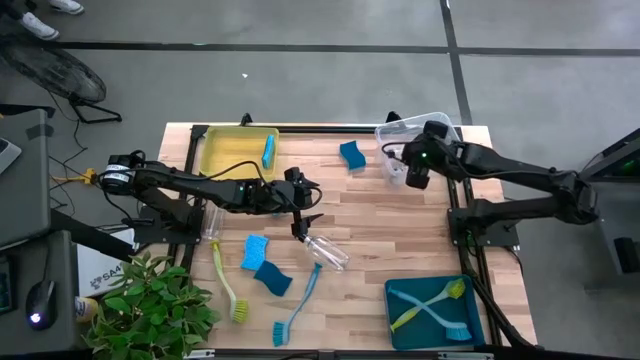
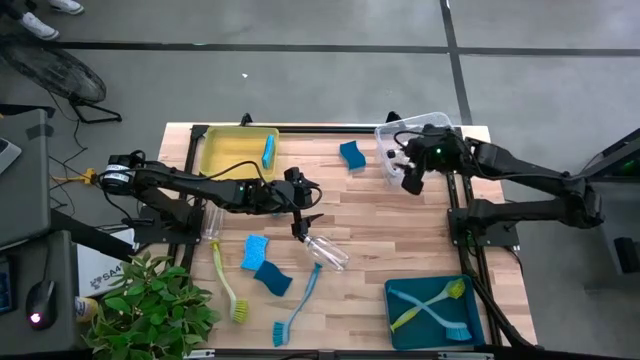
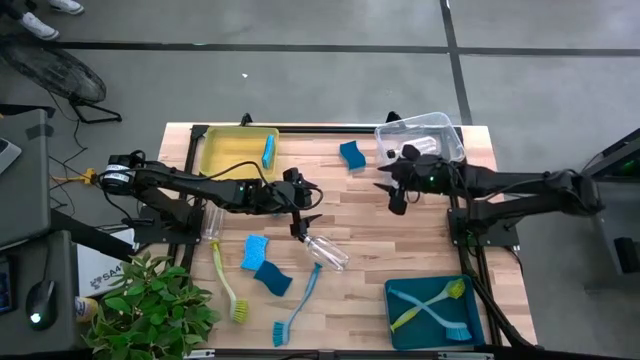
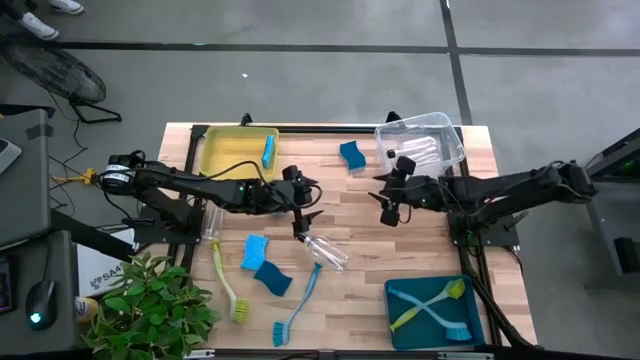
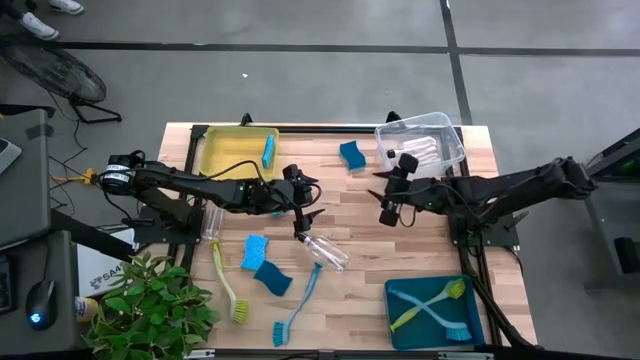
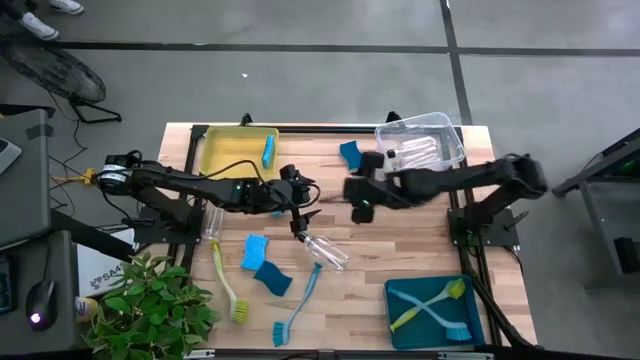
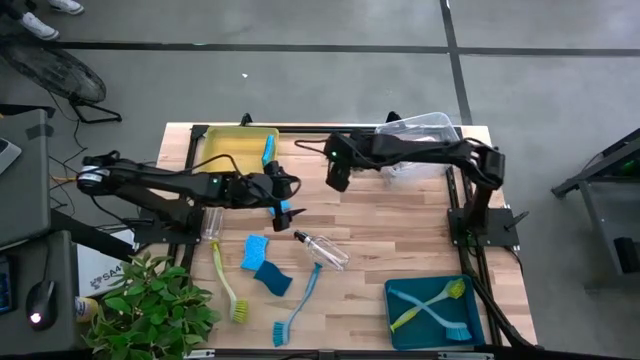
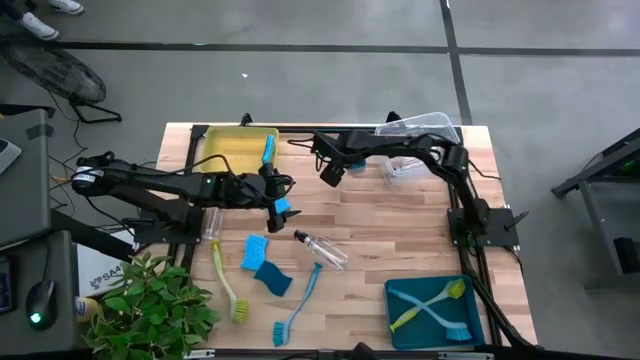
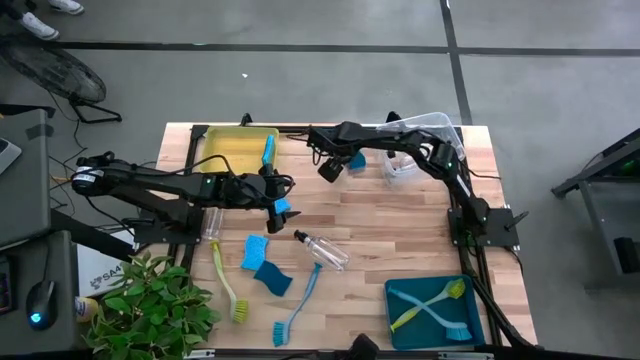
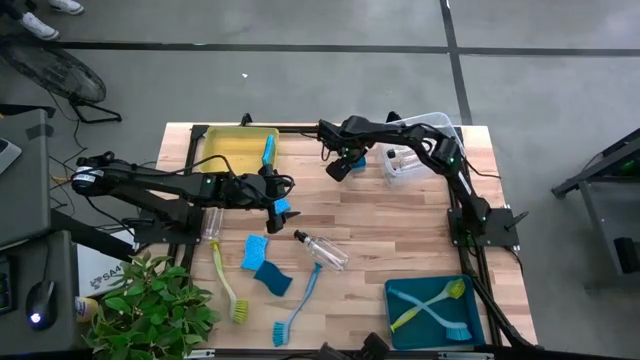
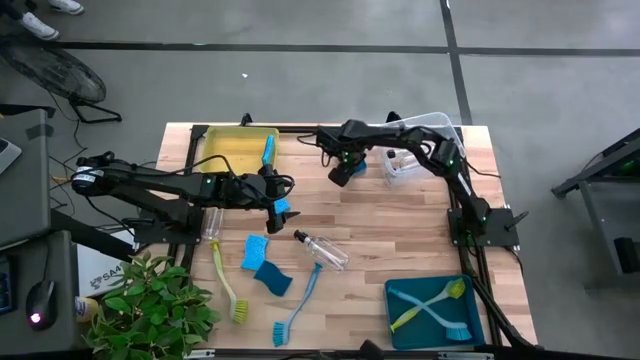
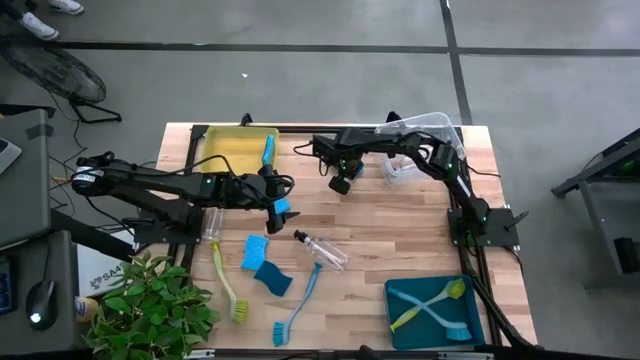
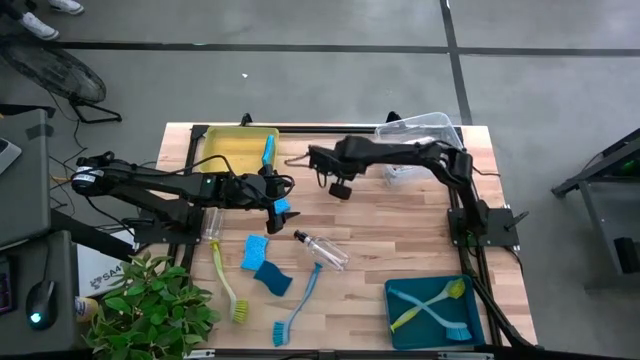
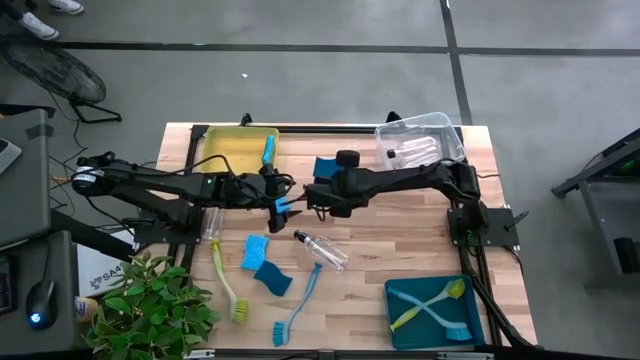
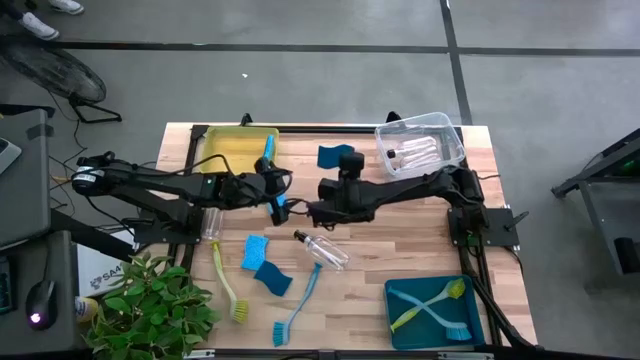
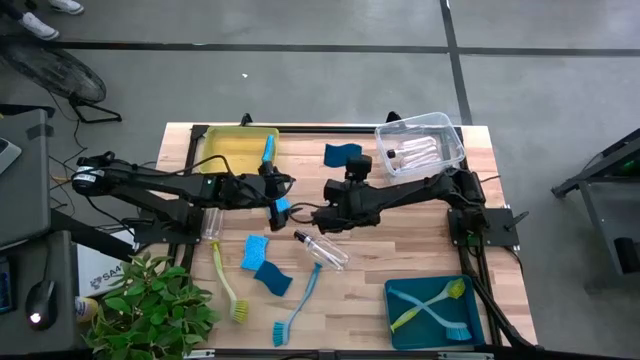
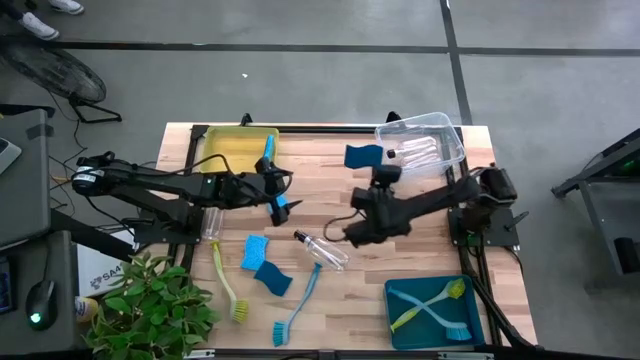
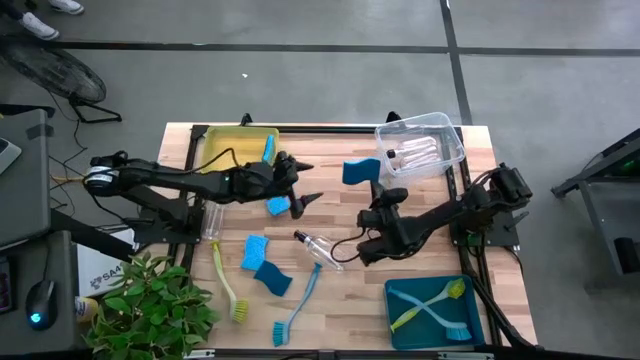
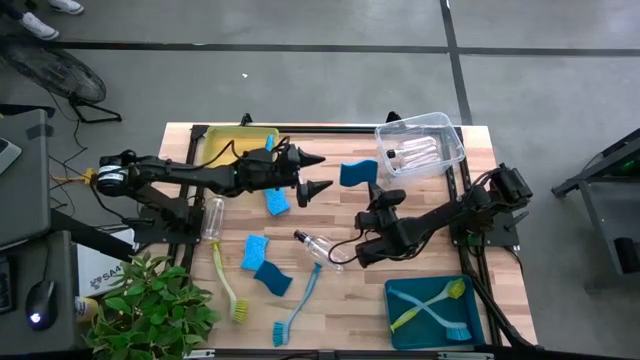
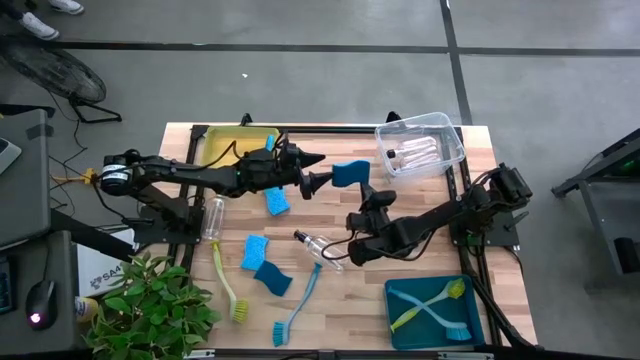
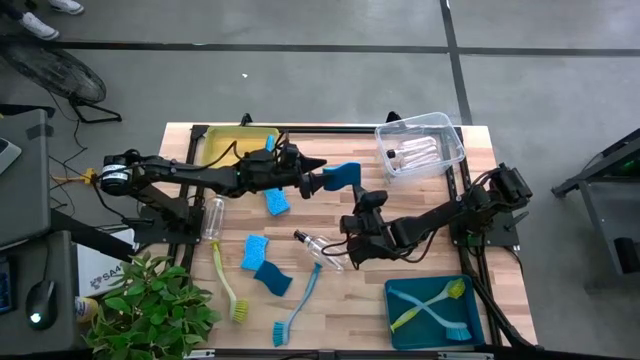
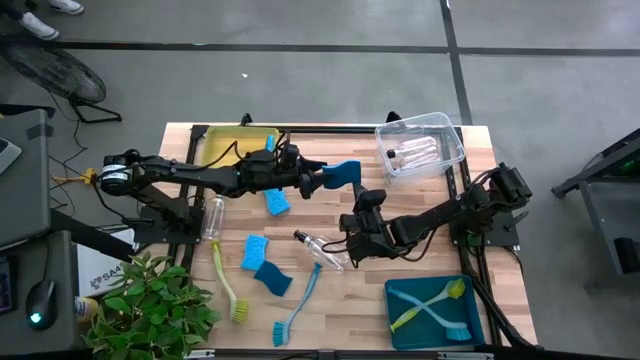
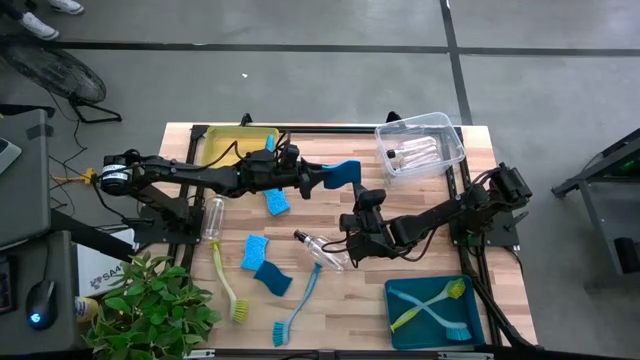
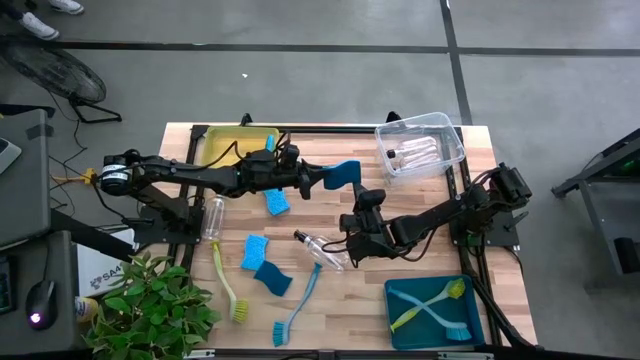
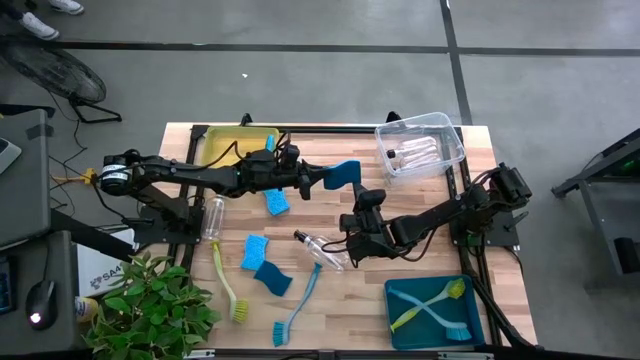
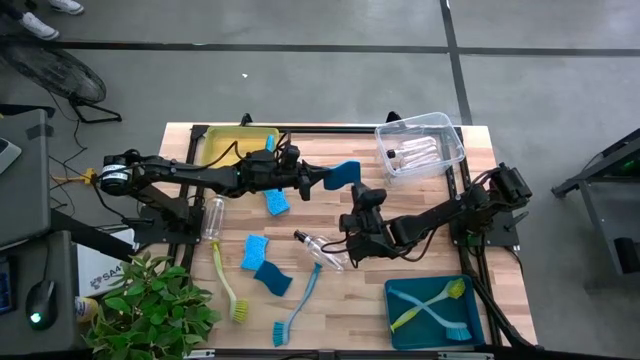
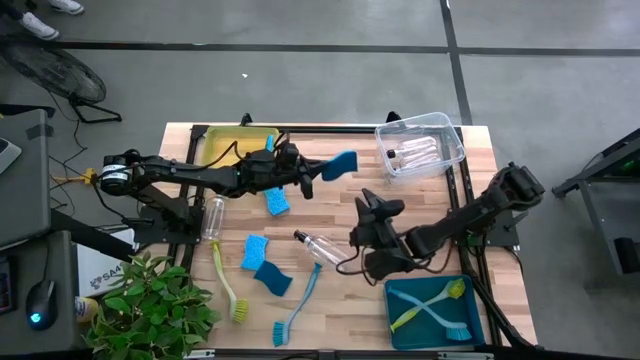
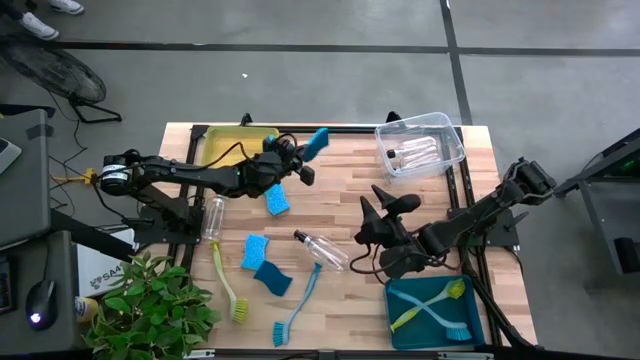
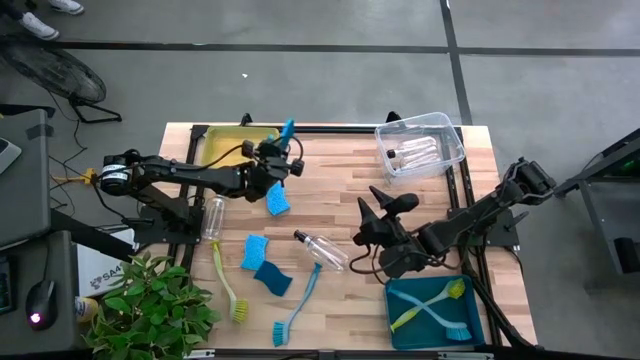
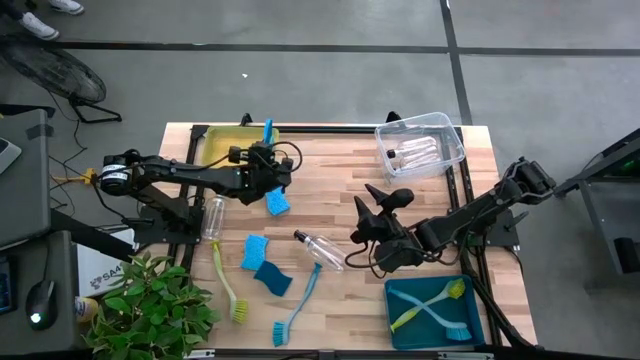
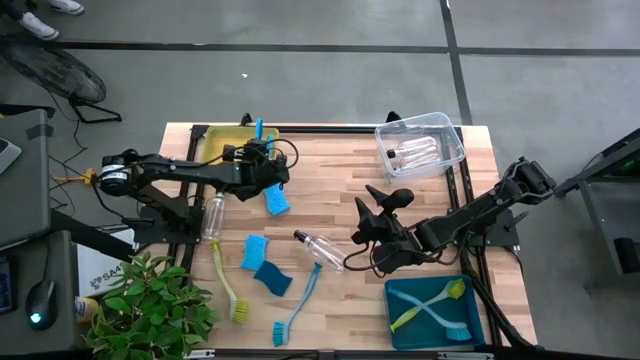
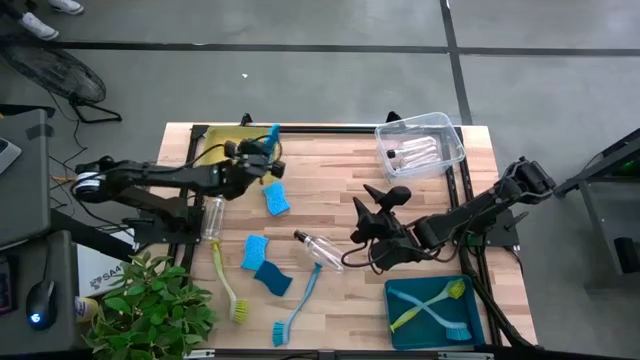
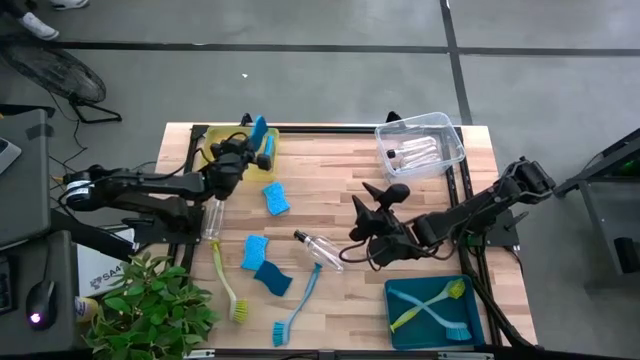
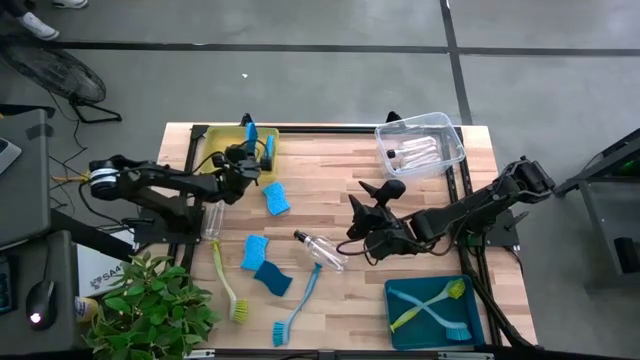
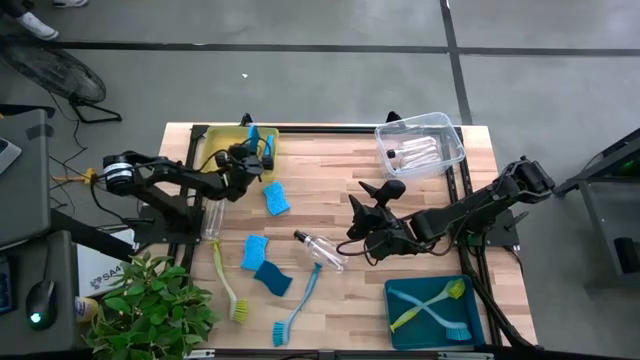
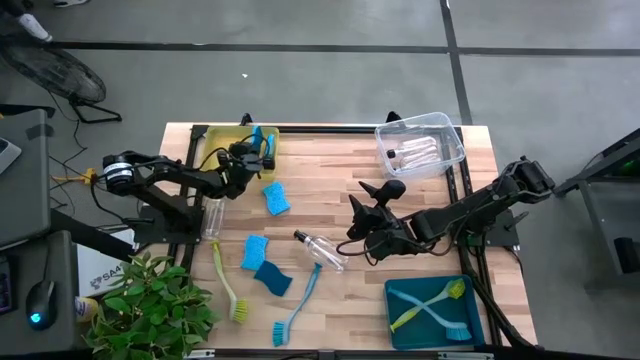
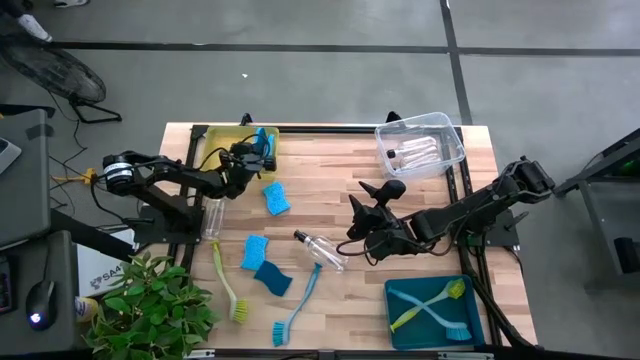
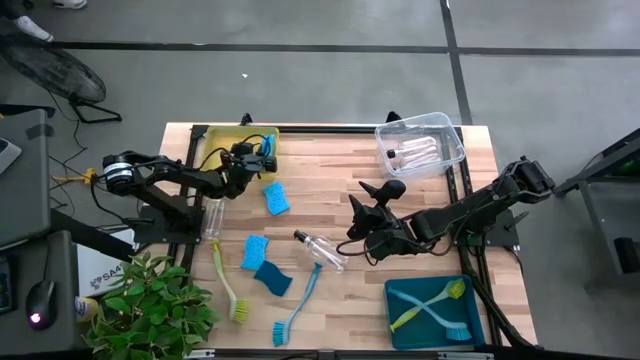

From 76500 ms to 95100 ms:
Task: Pick & Place Kitchen Sink Supplies
Put the blue sponge into the yellow bin

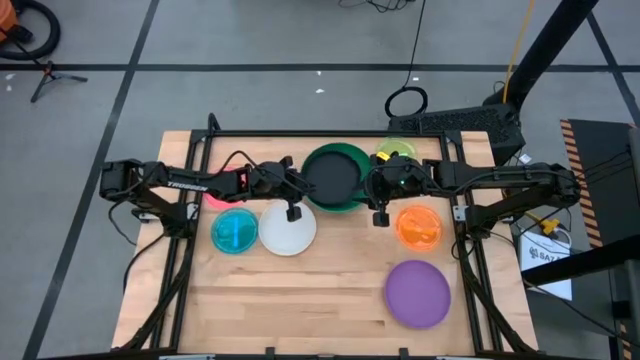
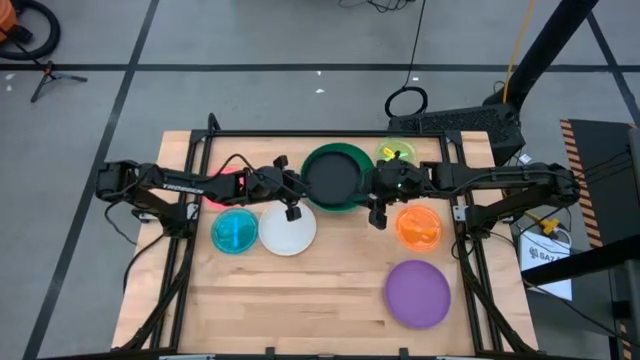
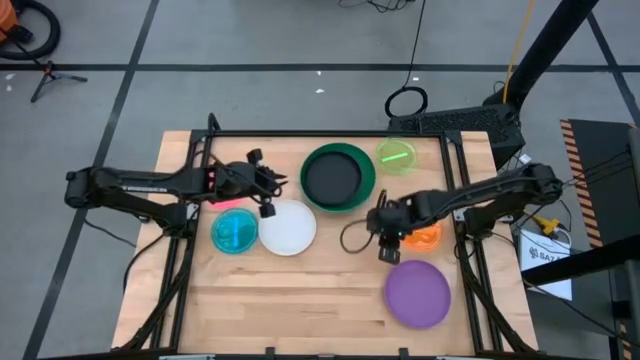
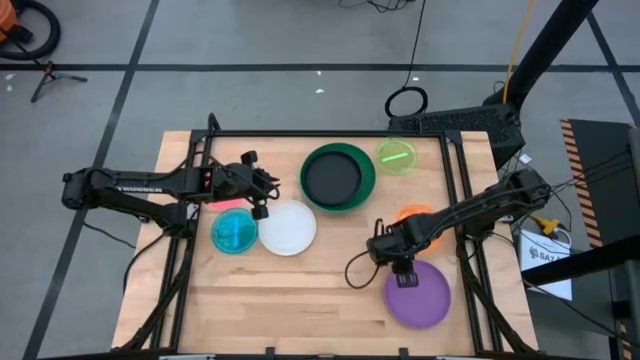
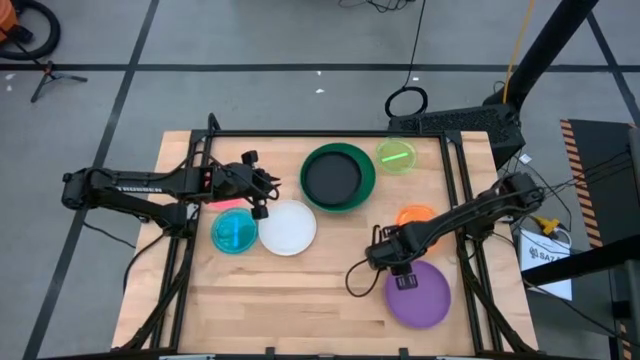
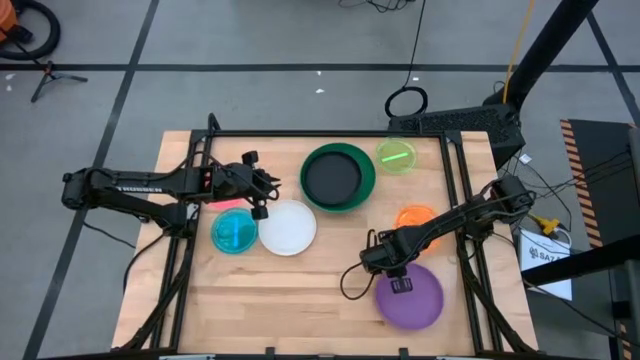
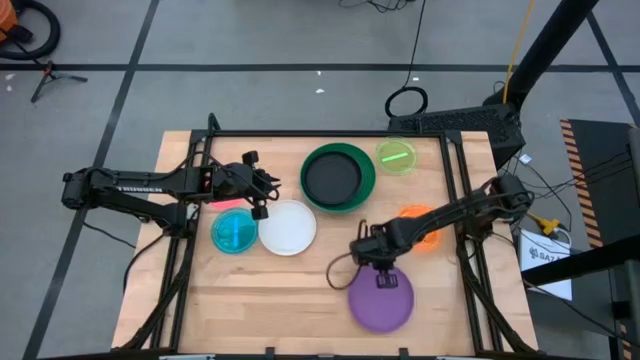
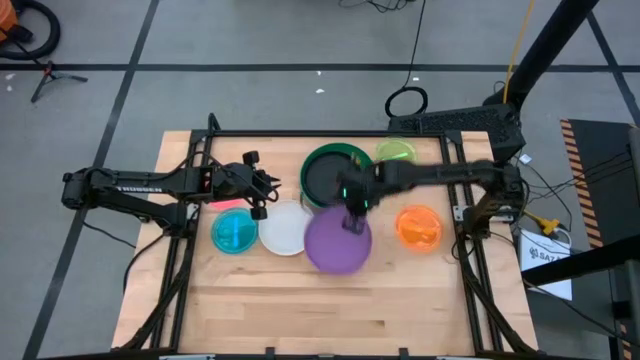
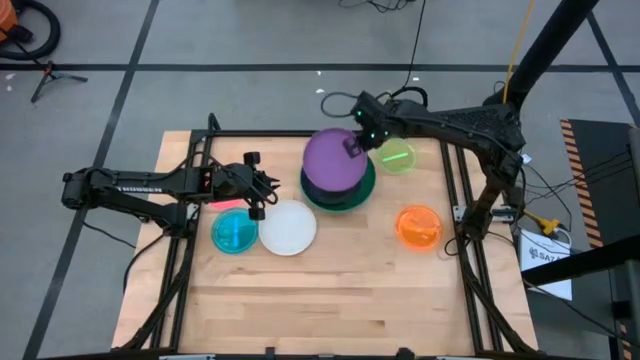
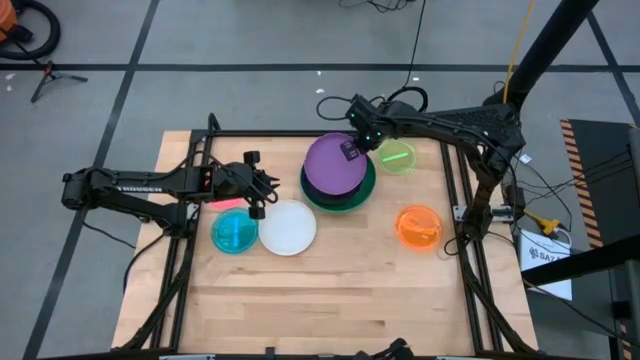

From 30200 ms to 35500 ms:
Task: Stack plastic plates
Stack the violet plate on top of the black plate
